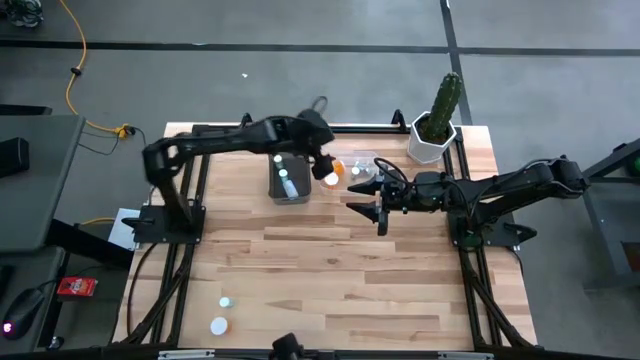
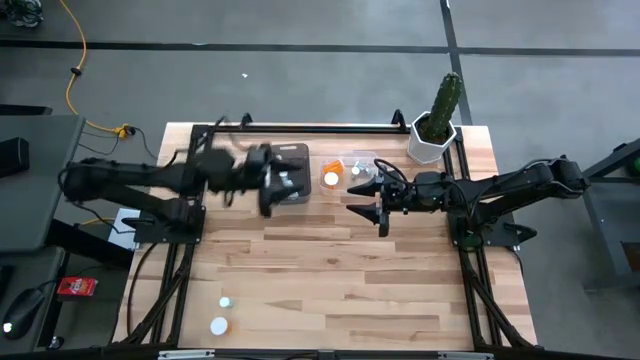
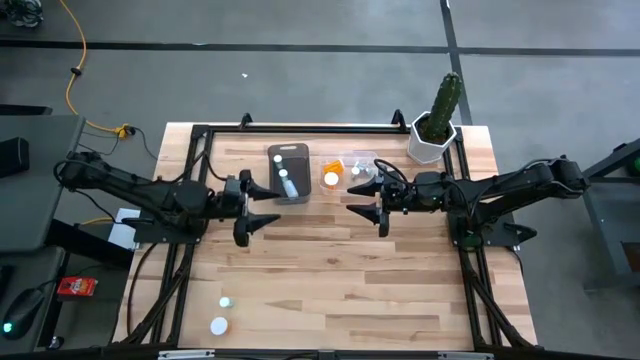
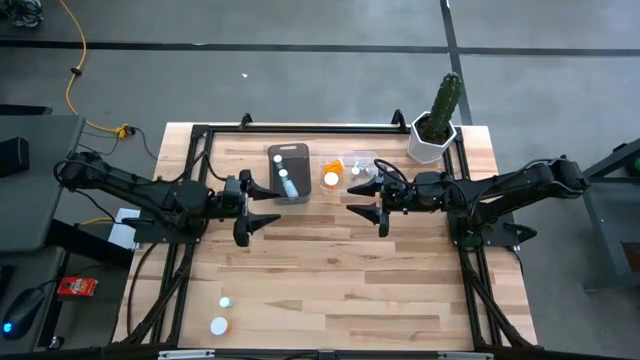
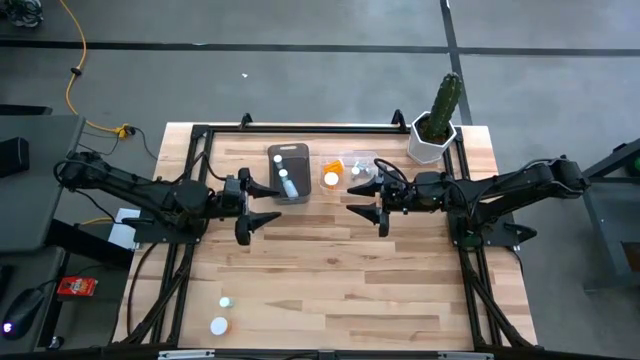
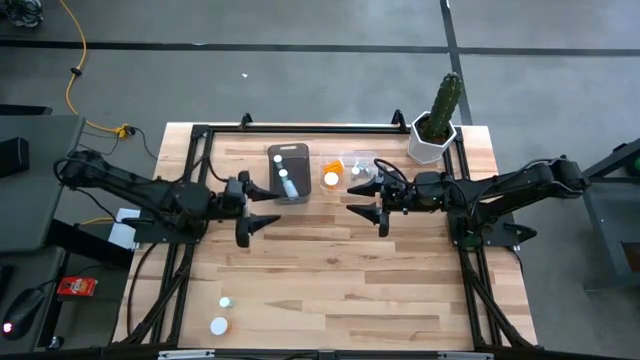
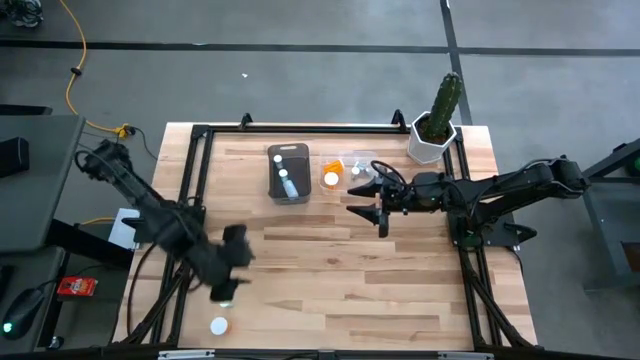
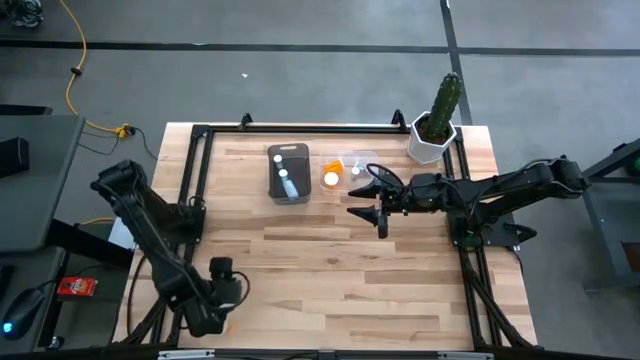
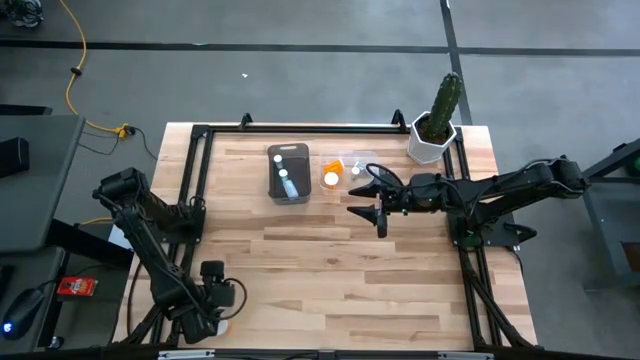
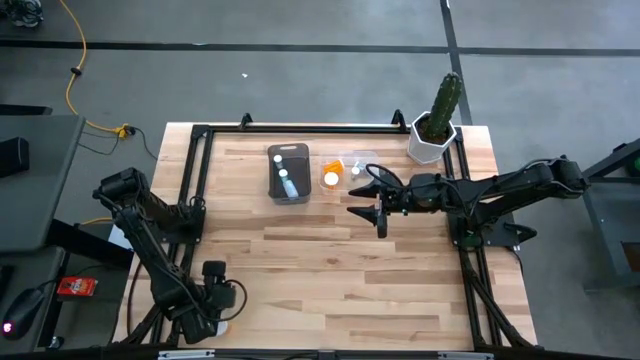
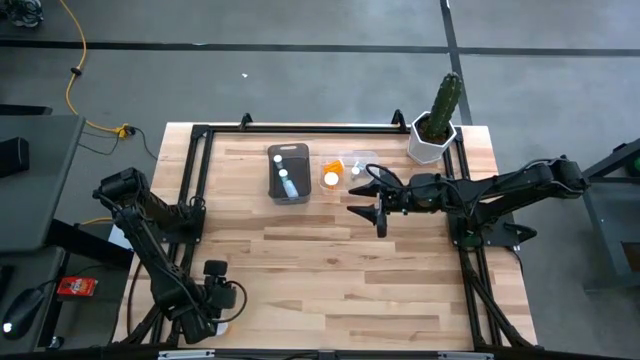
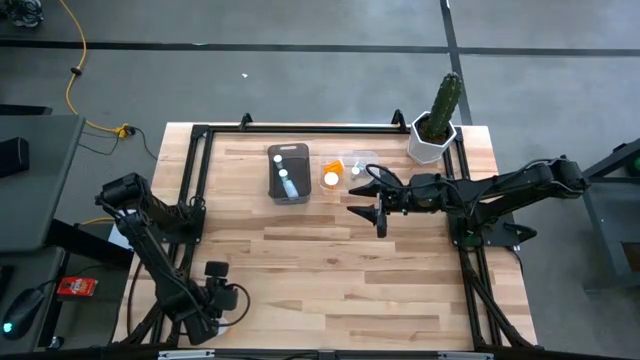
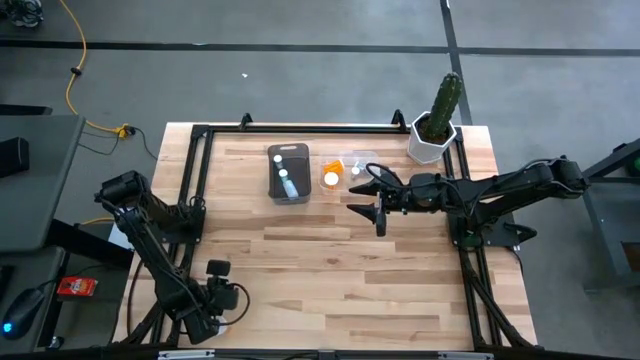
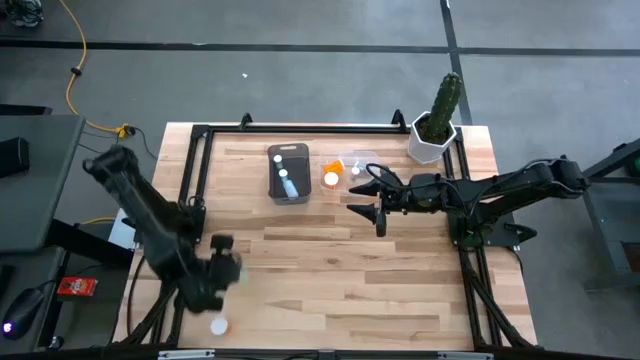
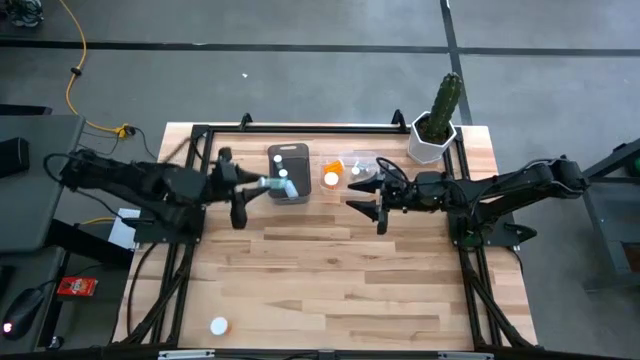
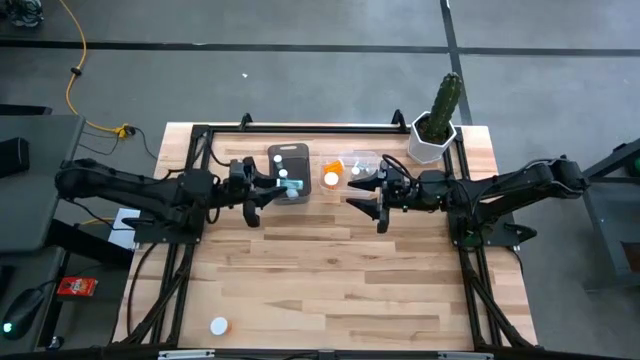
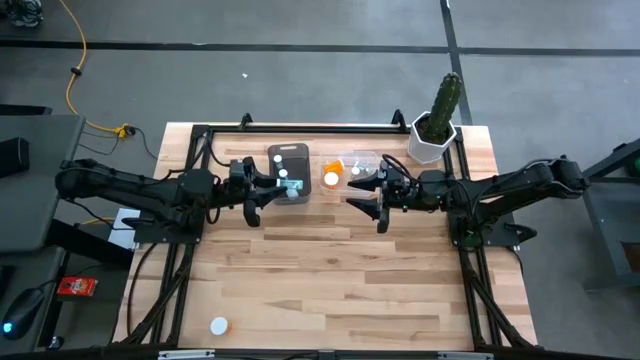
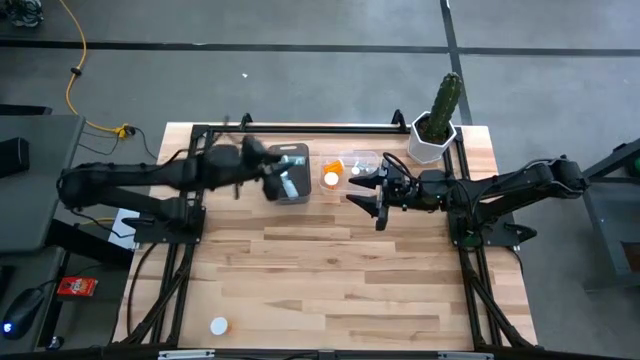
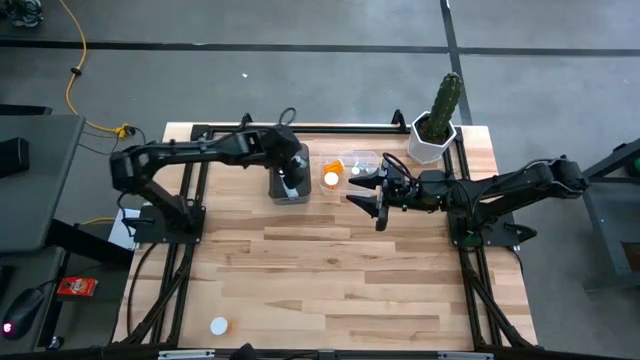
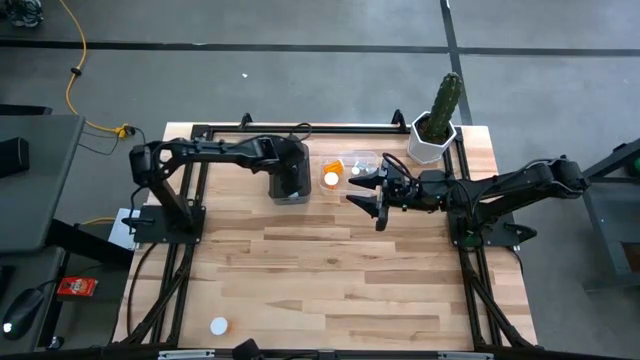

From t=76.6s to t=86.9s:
Task: Pick and place medicine bottles into bin by pill shape (circle, oval)
Put the blue tablet bottle into the black bin

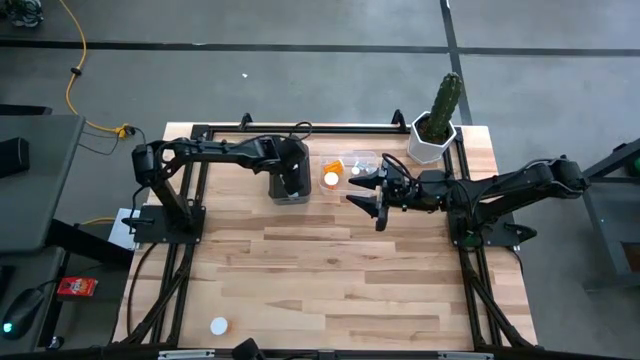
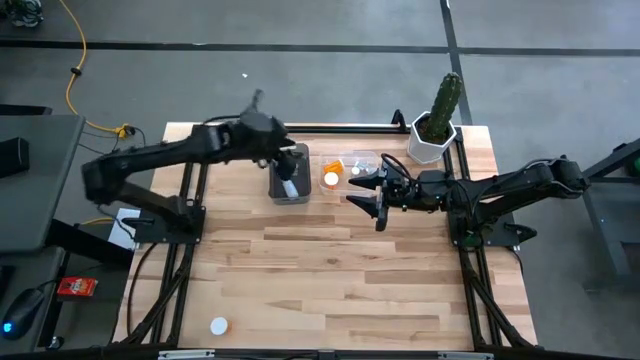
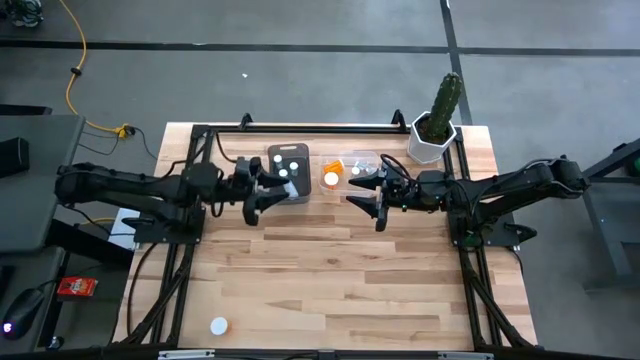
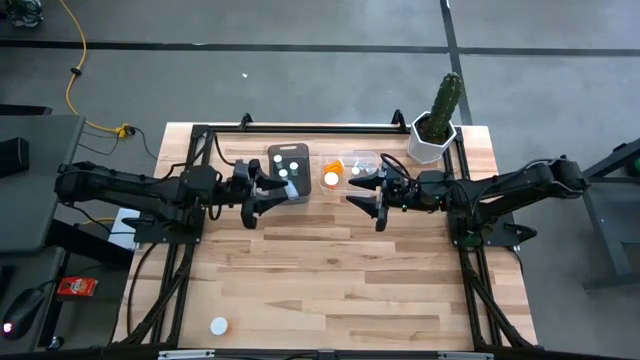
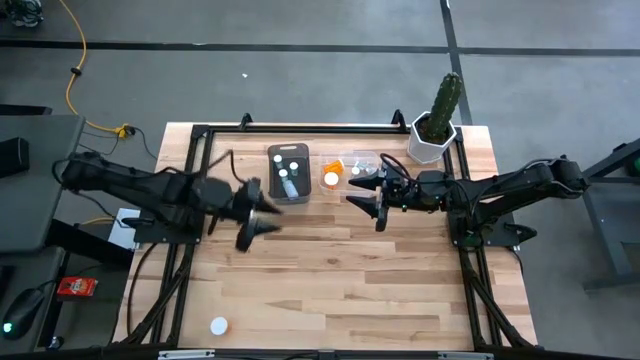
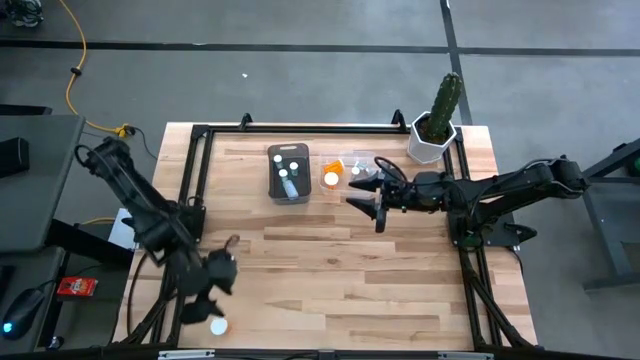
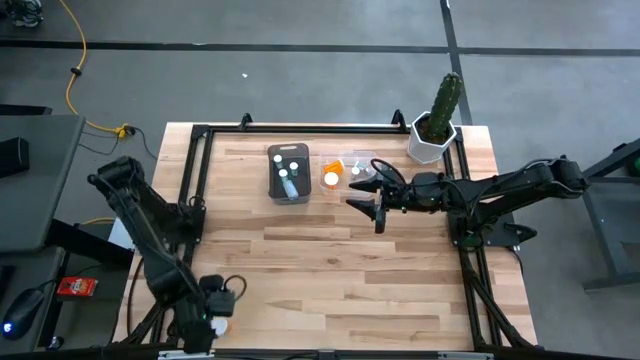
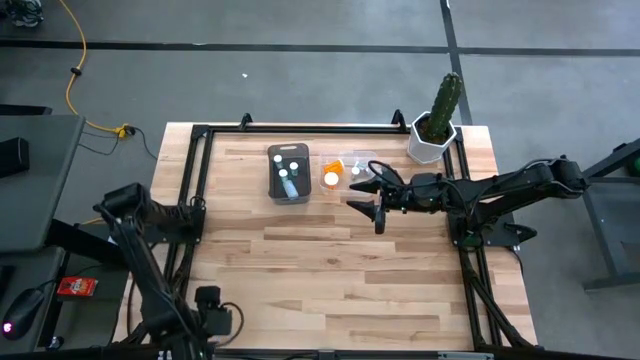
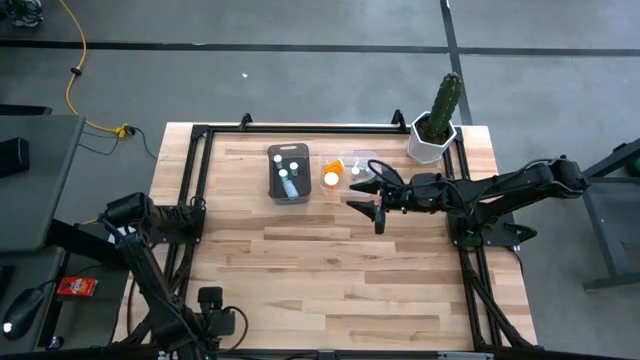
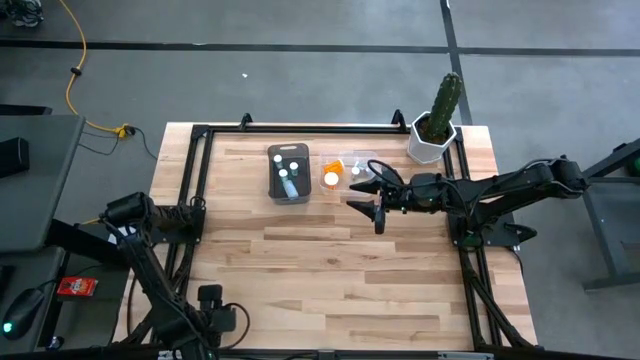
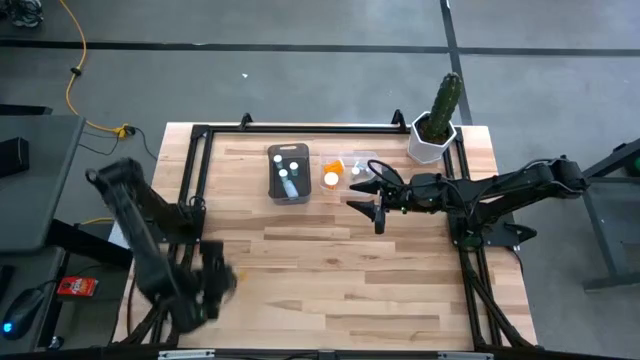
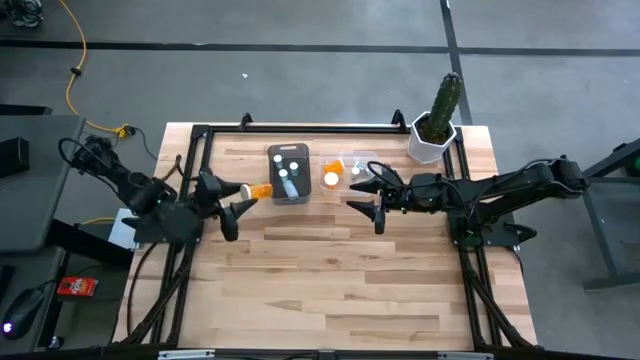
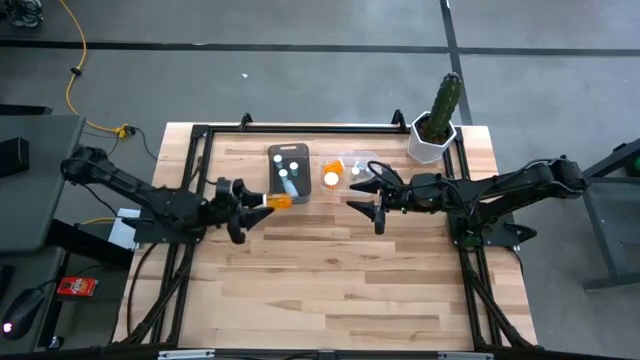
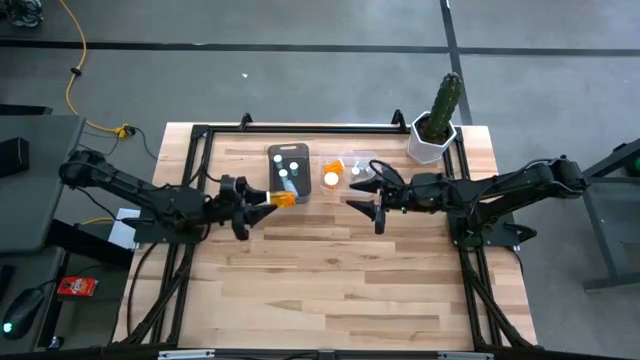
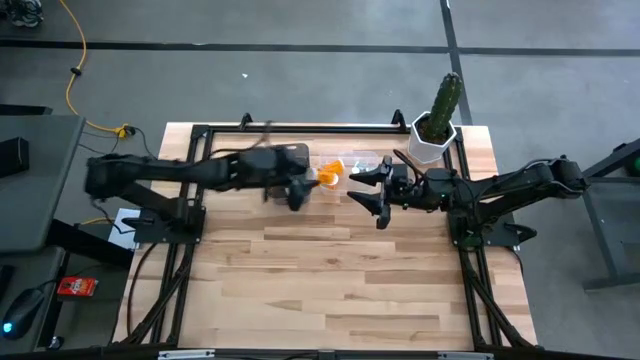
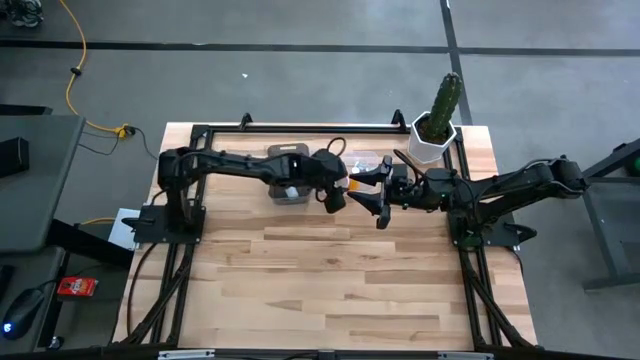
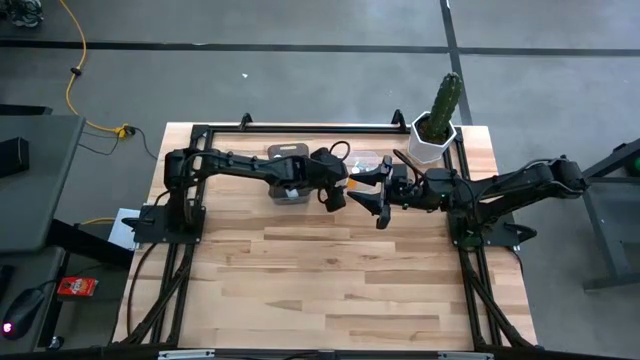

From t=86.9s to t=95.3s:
Put the orange capsule bottle into the transparent bin

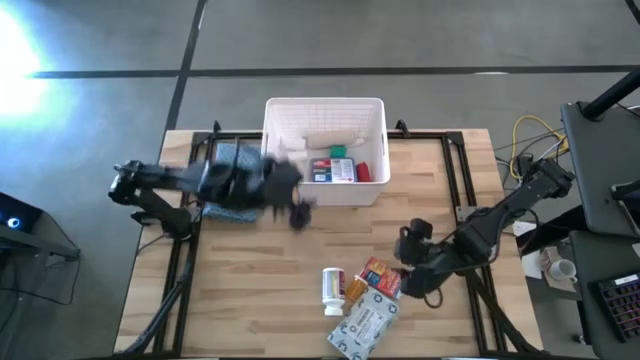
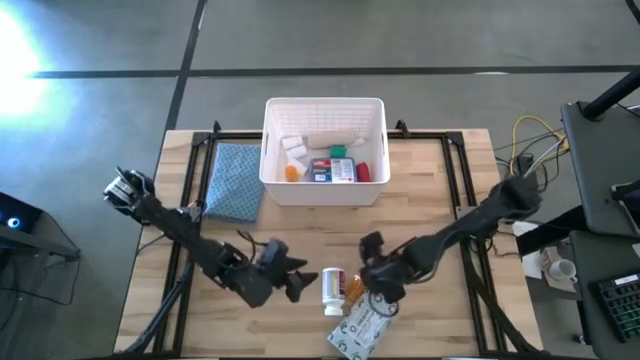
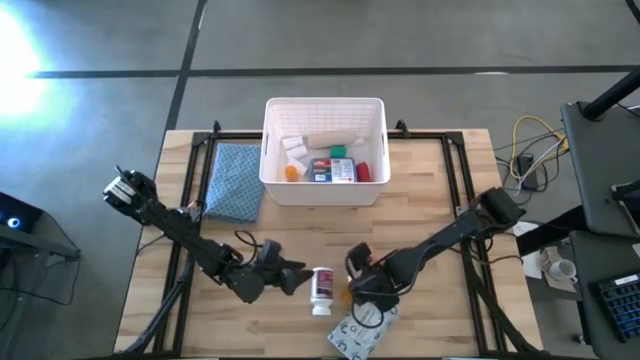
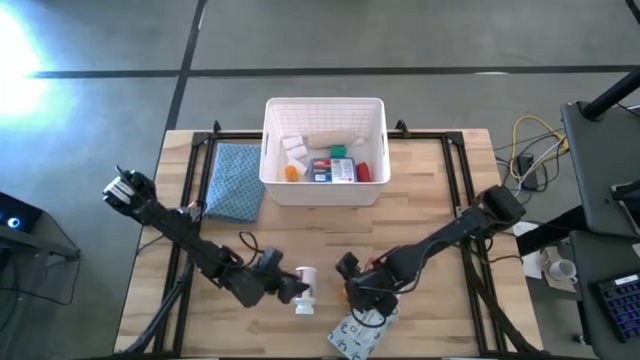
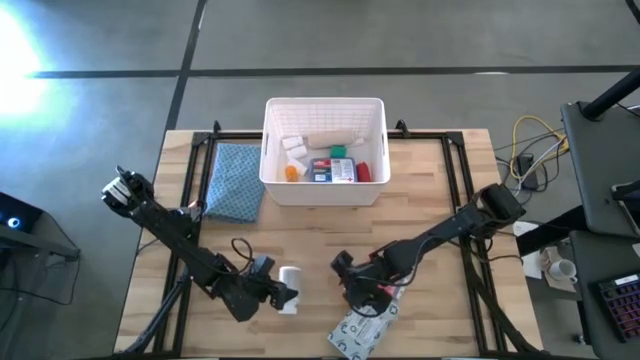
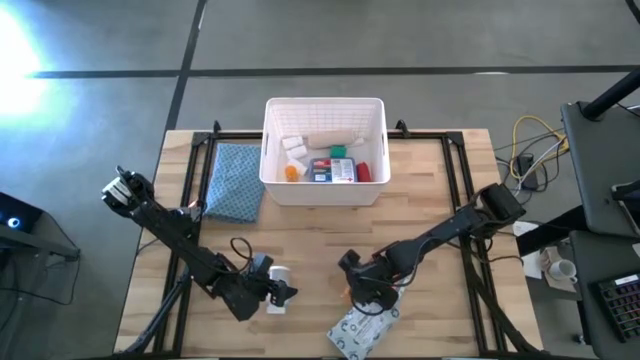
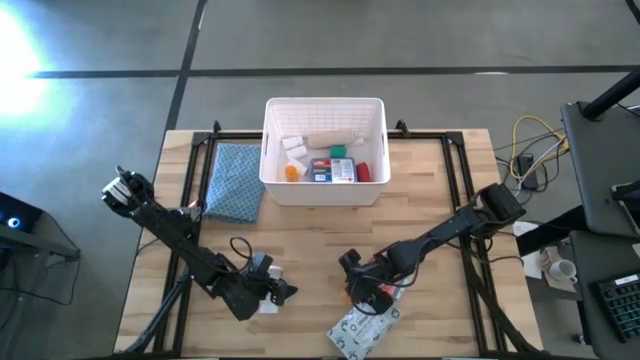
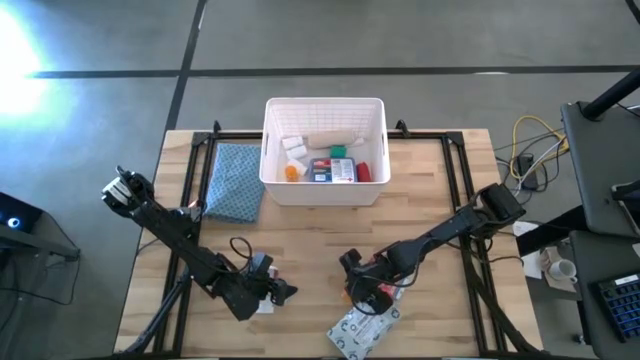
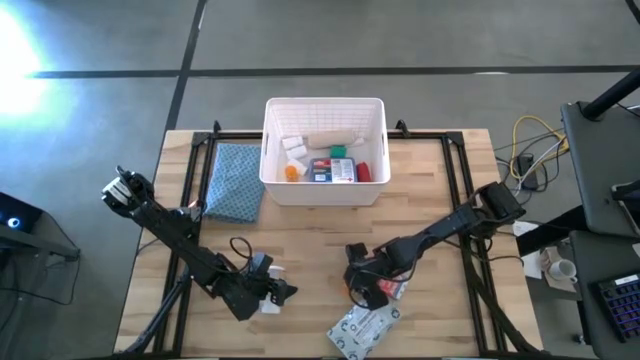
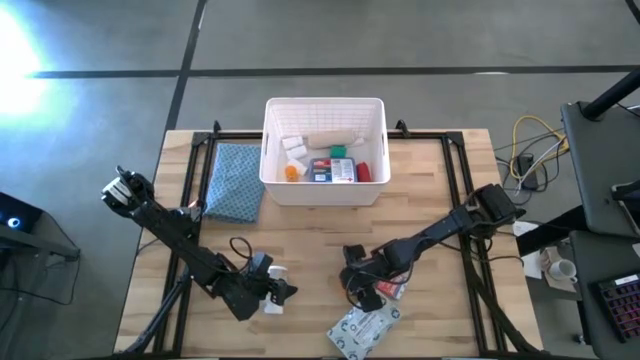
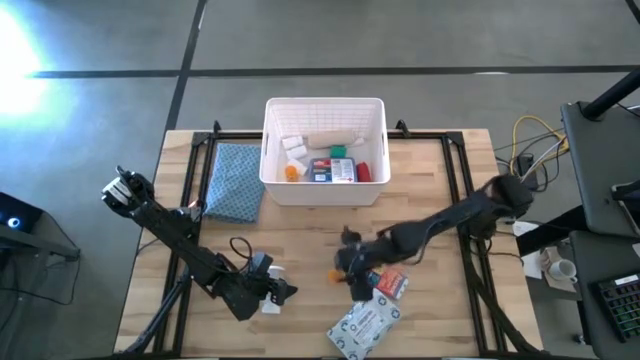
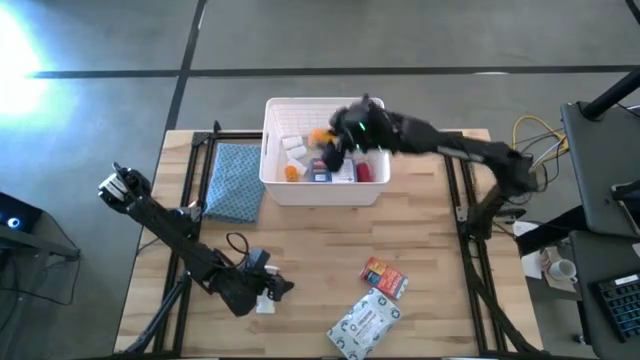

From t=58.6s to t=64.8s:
Task: Pick & place medical supplies in basket/bin
Put the yellow pill bottle into the white bin
